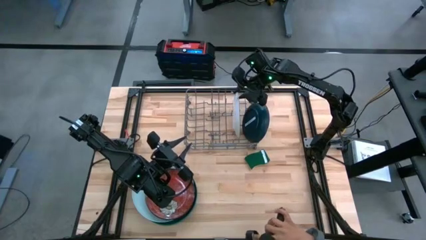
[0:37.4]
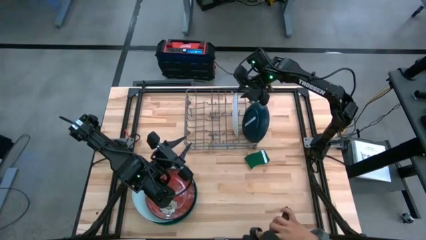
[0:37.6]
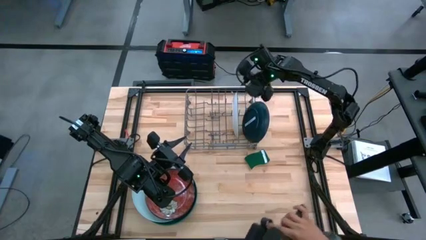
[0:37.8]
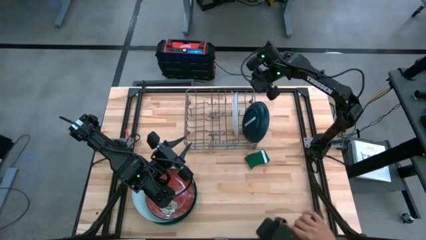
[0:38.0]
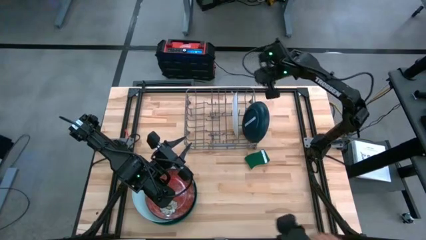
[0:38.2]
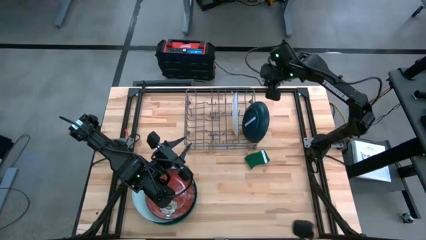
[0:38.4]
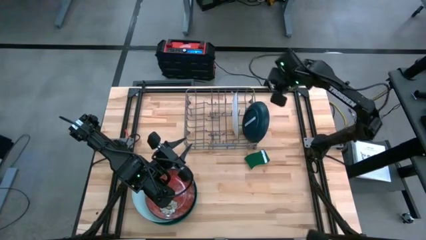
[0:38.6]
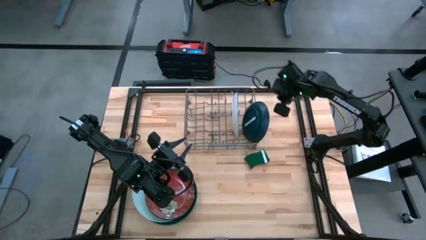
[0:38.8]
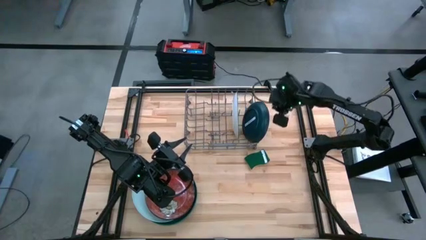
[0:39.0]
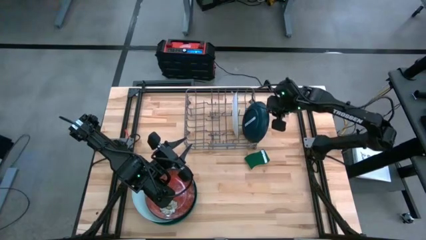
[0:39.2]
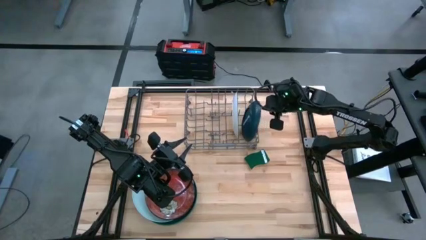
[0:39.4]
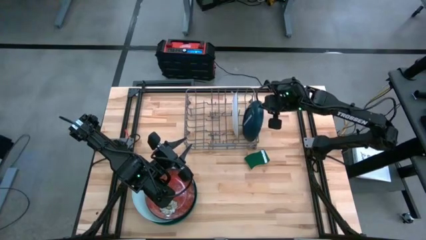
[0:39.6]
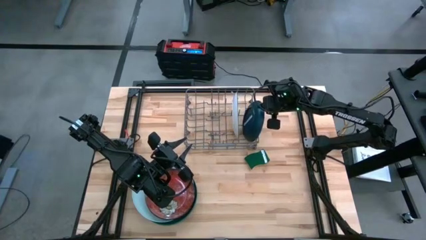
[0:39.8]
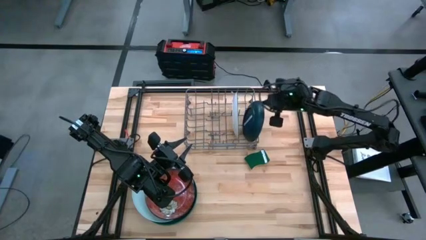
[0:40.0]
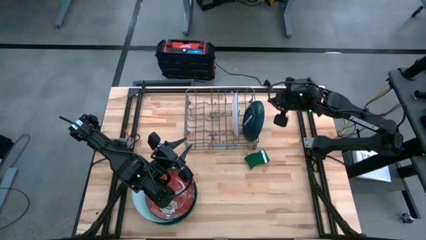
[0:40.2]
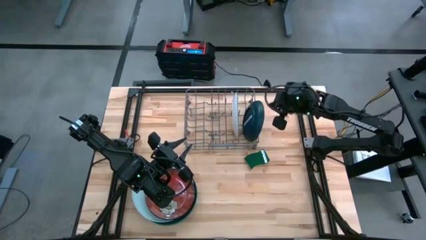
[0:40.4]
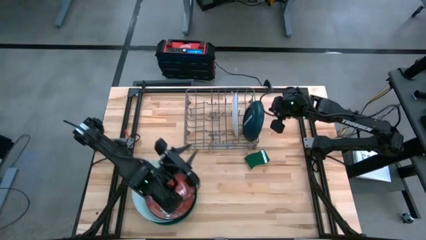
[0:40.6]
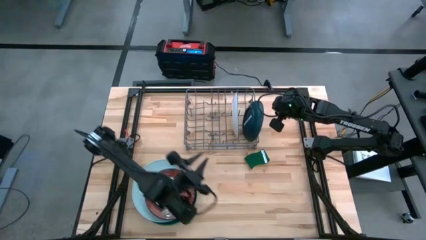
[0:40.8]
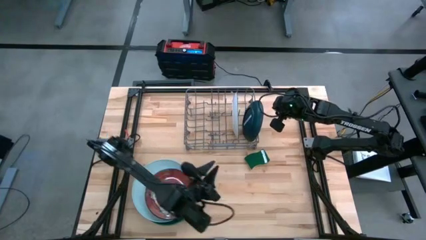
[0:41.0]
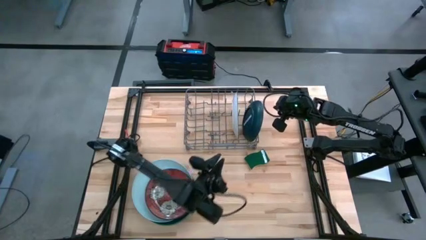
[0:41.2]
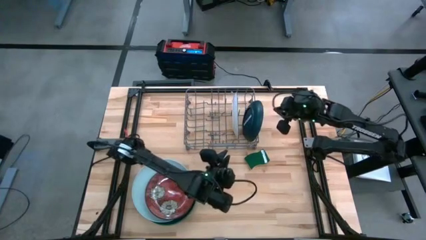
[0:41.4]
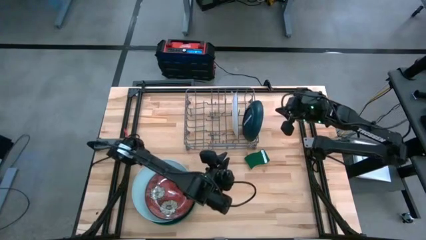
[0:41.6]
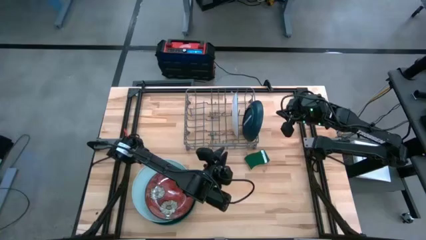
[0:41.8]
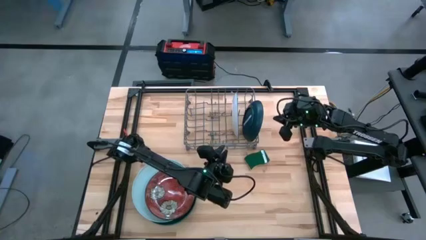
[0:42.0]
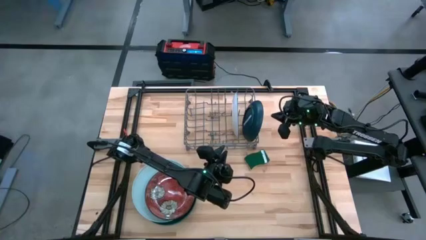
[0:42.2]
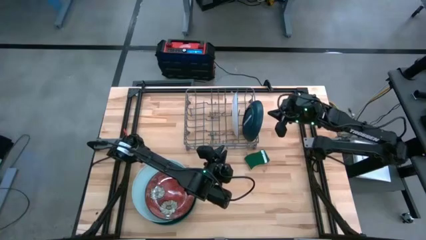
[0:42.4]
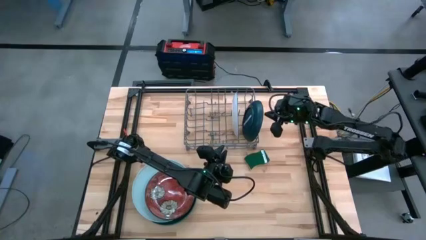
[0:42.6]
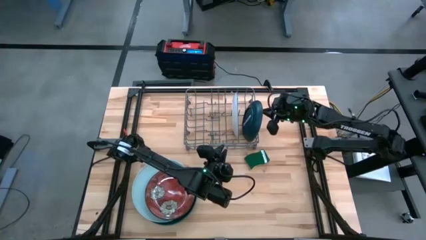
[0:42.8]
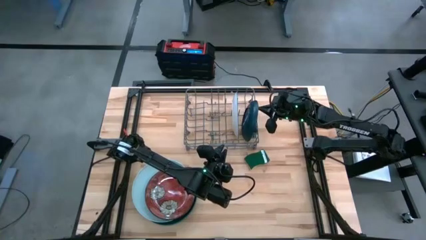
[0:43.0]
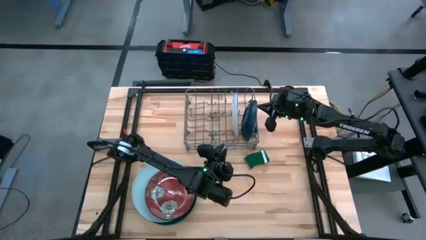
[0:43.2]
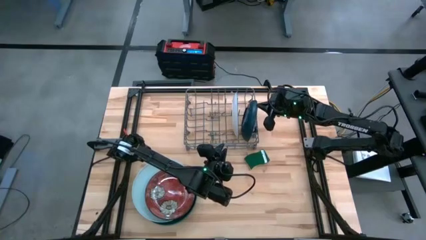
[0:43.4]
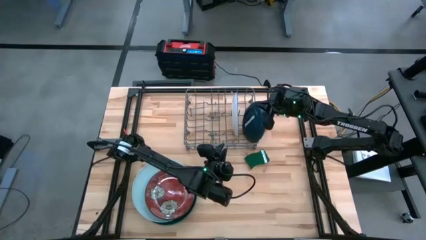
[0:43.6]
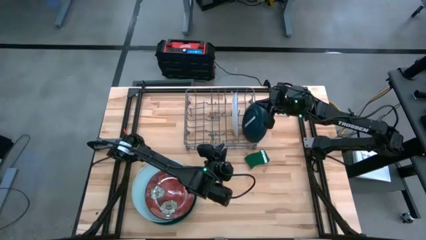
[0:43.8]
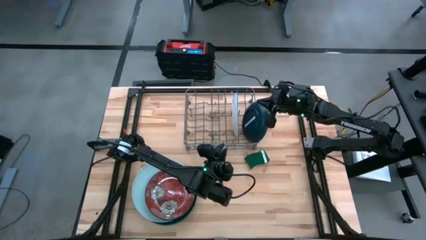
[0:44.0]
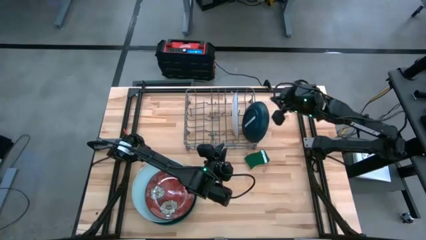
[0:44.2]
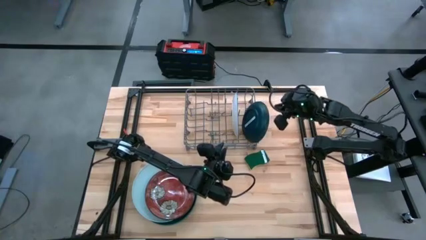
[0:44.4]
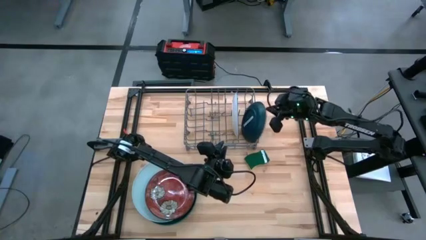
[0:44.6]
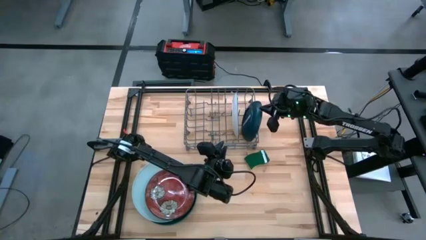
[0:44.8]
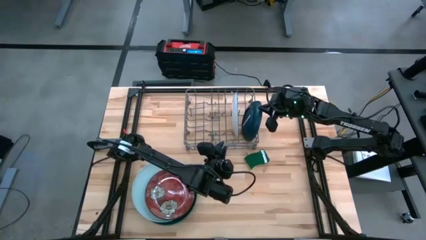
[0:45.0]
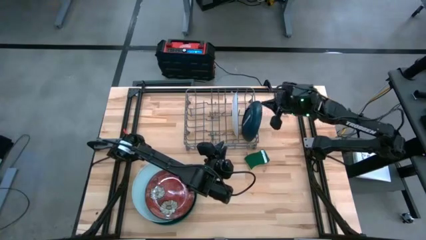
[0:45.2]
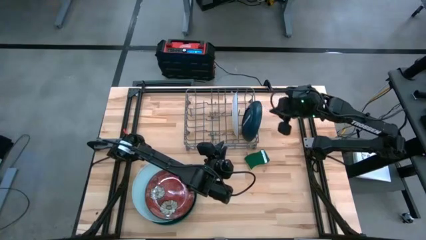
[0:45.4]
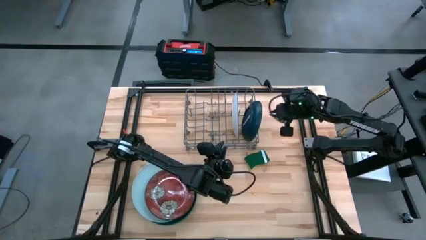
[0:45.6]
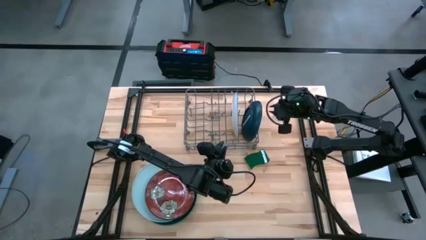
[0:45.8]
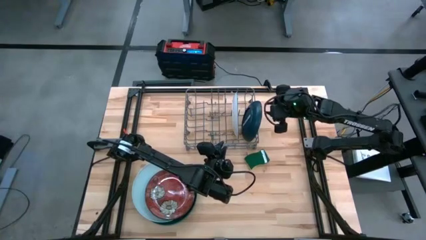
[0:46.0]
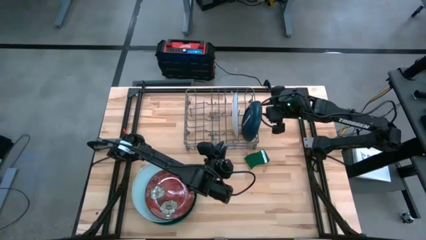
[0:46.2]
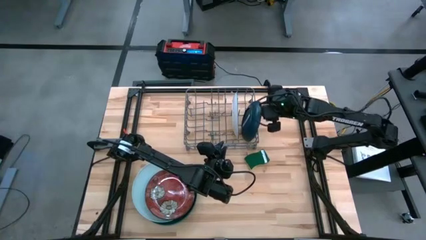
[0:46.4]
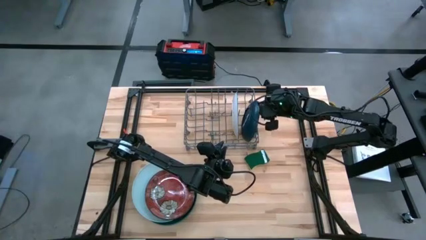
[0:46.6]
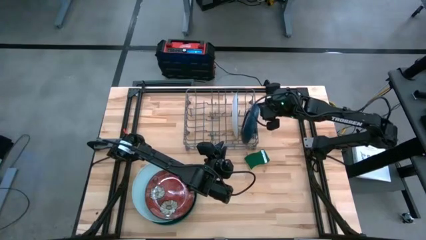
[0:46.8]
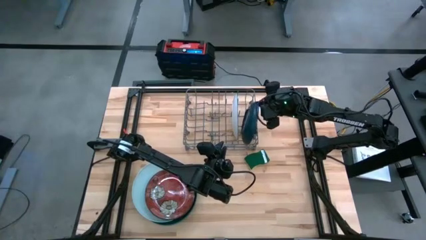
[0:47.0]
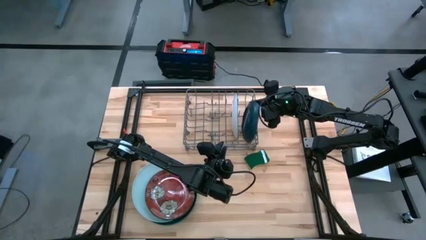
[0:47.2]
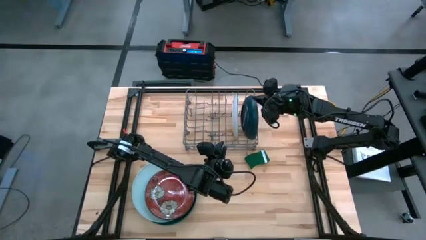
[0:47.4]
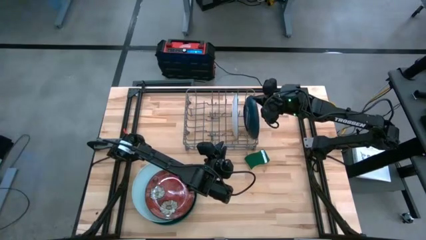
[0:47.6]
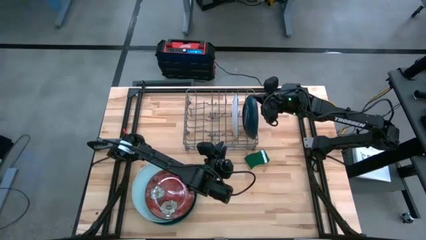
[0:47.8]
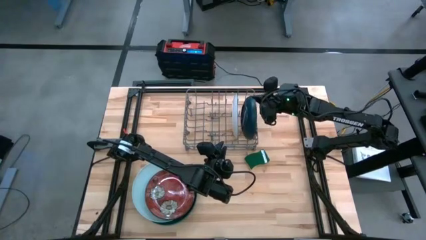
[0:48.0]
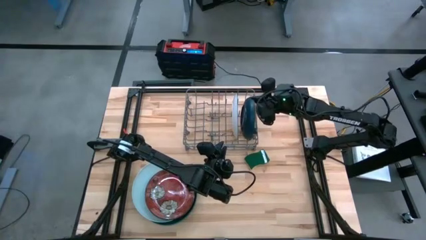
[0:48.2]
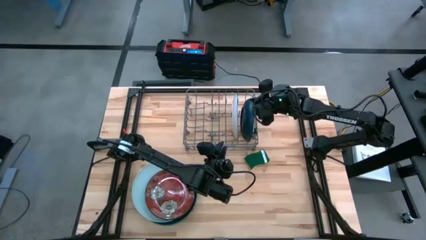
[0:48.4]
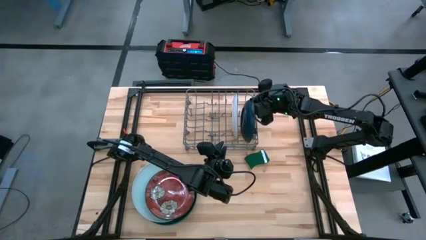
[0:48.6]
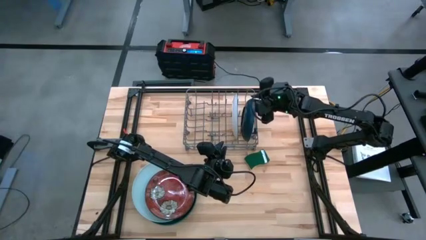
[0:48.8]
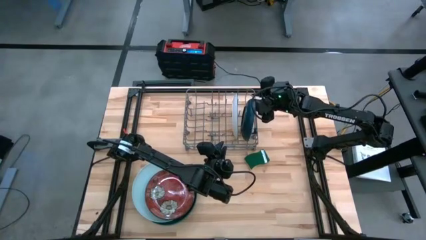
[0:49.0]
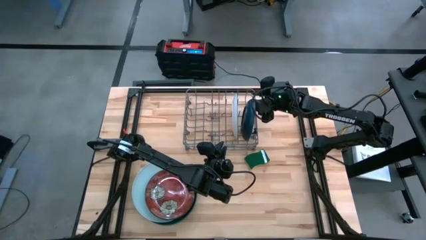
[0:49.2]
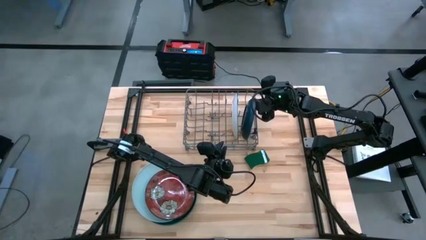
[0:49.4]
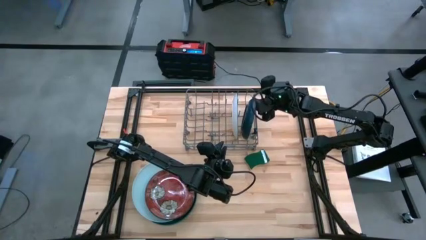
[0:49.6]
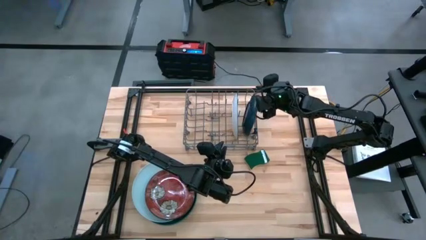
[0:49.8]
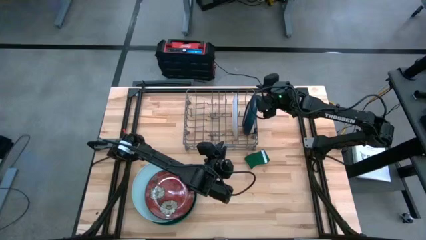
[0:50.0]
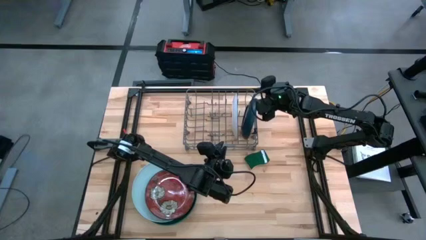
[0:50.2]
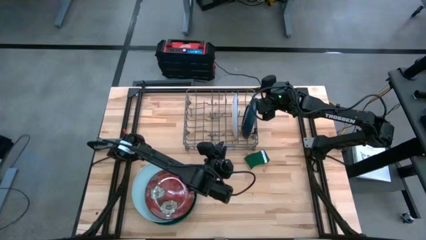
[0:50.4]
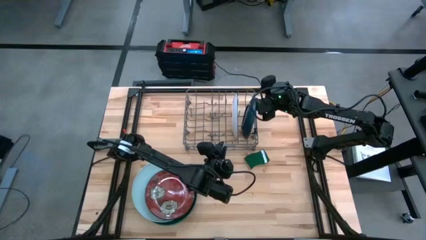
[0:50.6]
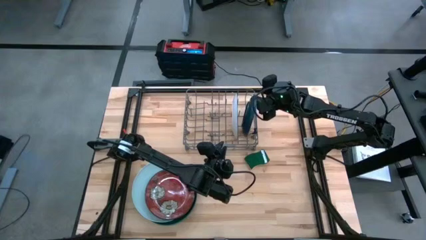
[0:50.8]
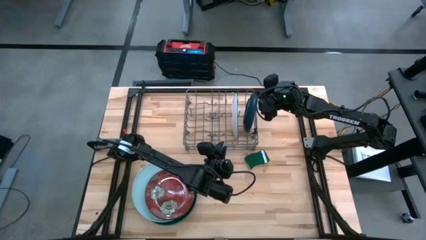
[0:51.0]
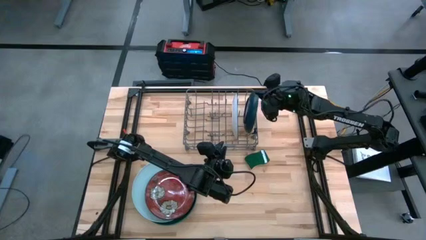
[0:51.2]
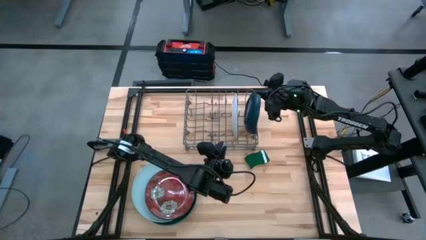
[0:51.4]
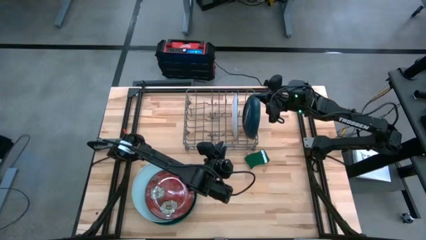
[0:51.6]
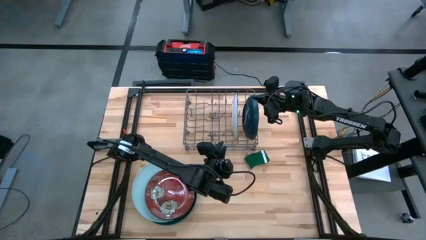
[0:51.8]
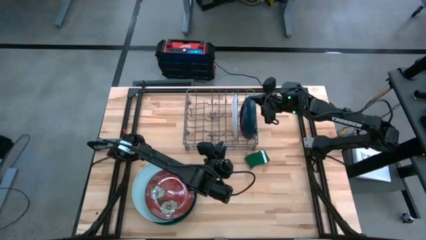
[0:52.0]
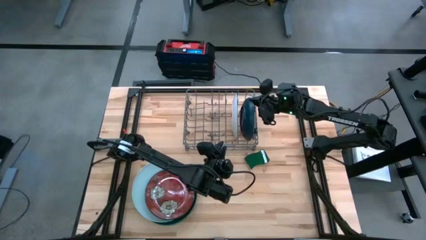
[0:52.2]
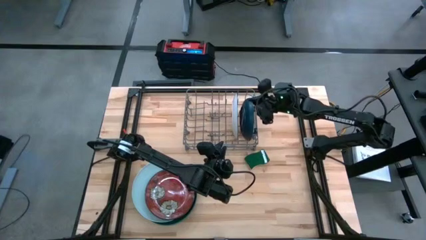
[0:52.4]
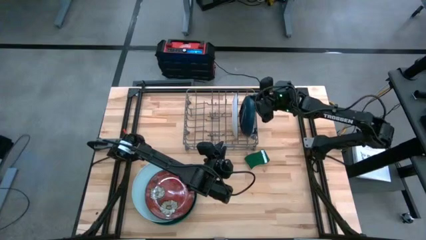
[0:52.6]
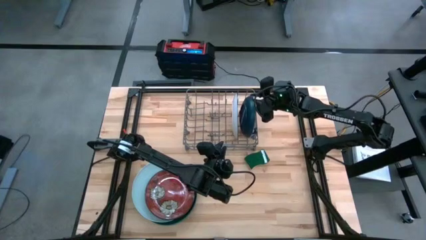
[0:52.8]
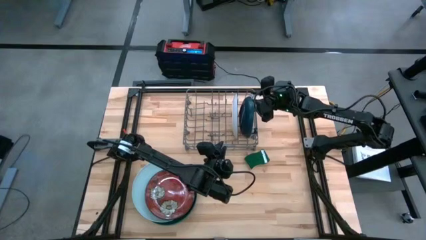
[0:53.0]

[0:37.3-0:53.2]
Task: Sort dishes
Adjust the dark green plate into the dish rack
